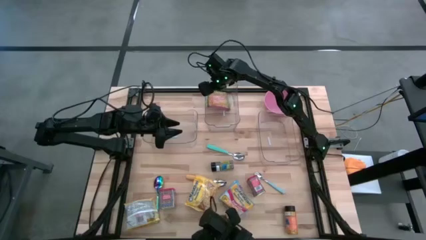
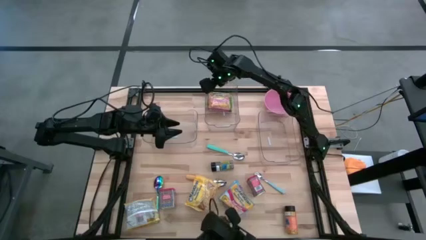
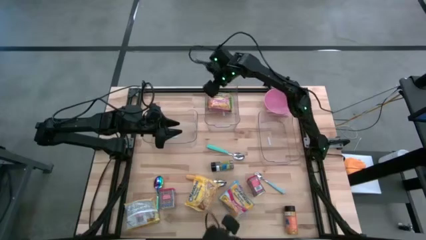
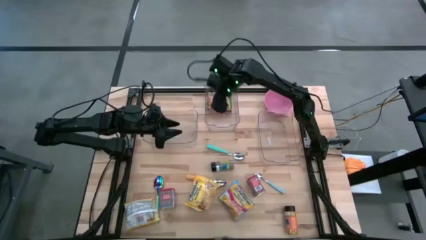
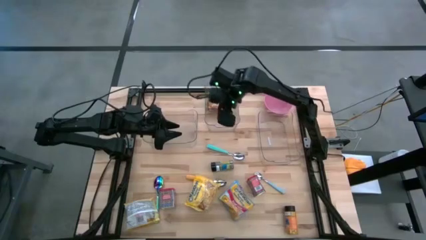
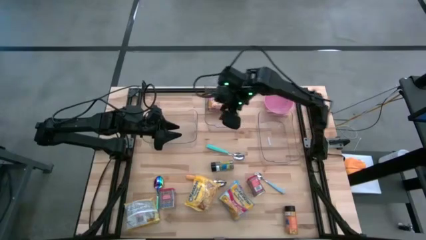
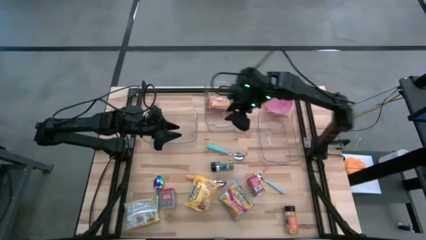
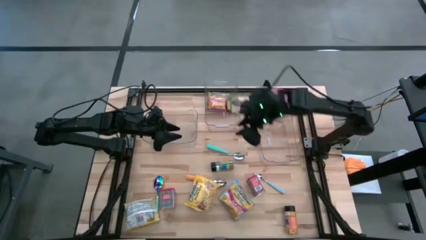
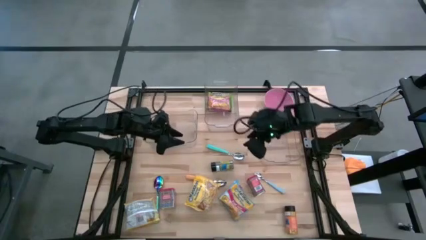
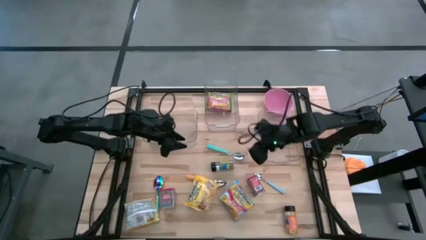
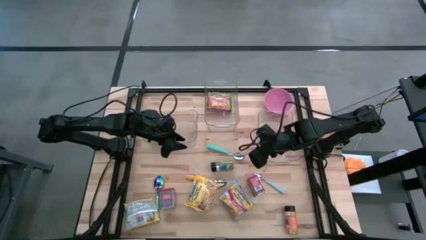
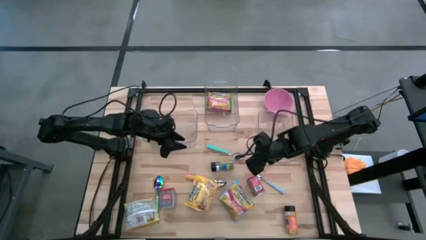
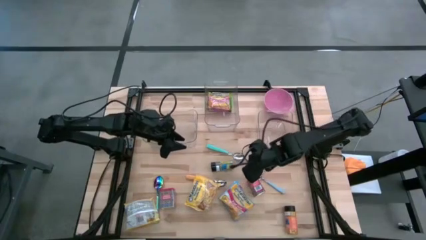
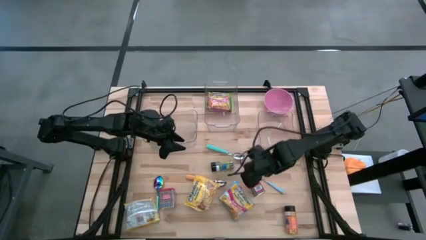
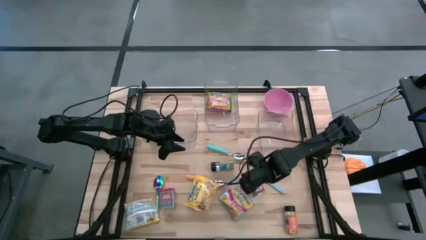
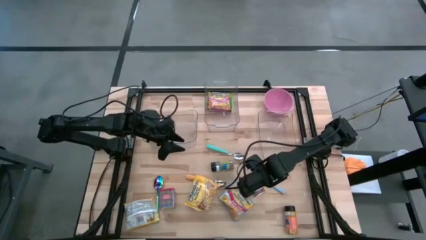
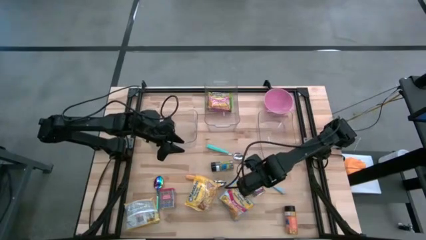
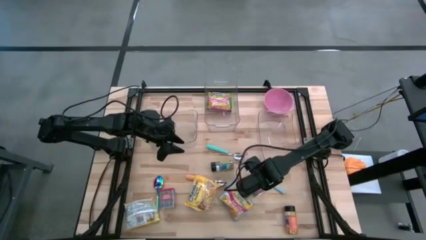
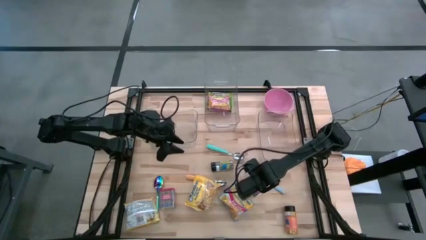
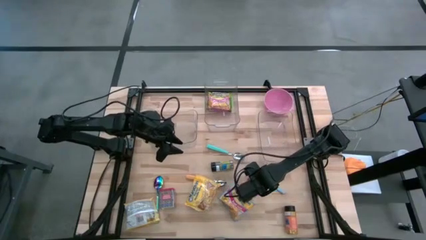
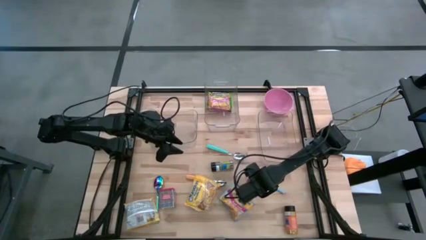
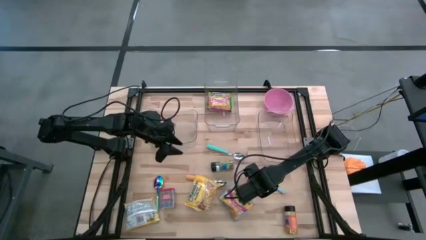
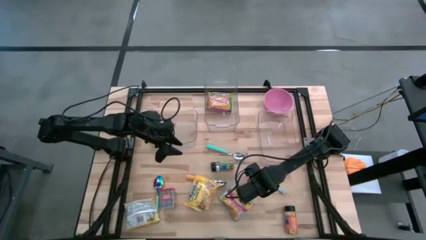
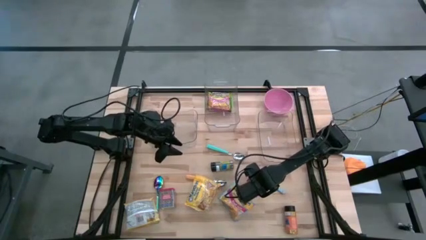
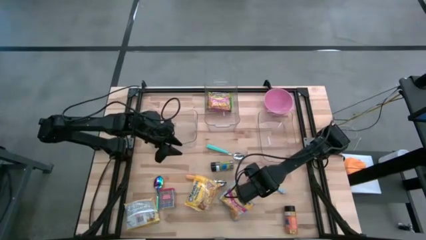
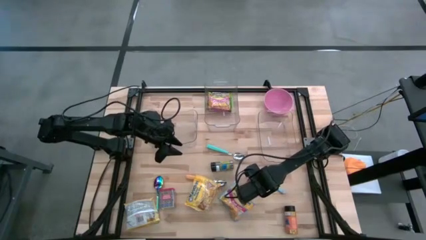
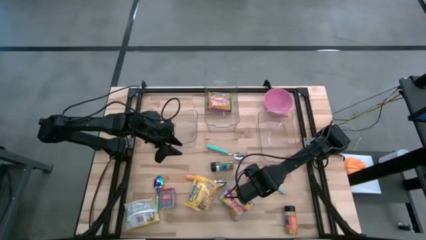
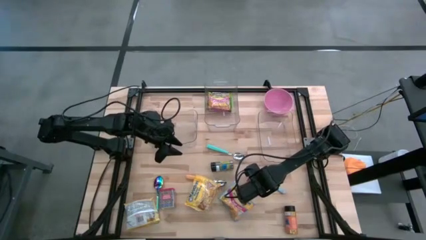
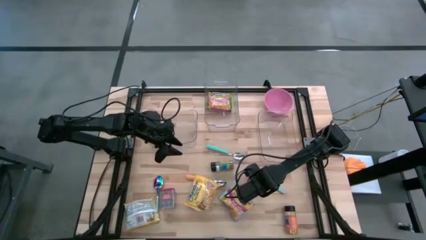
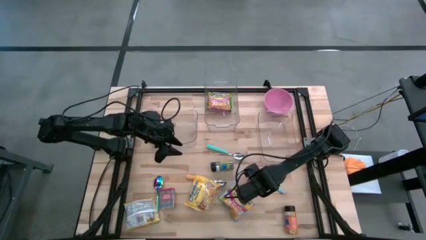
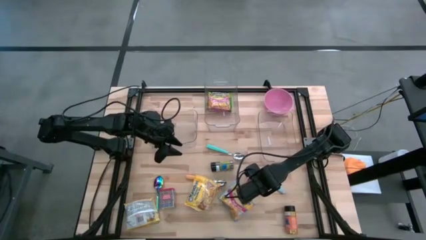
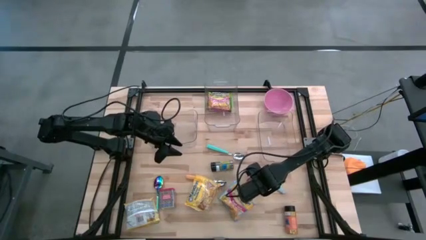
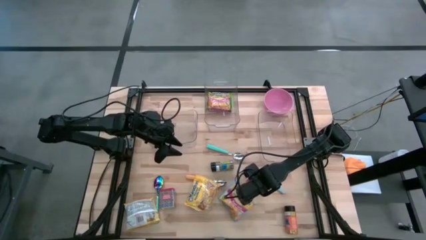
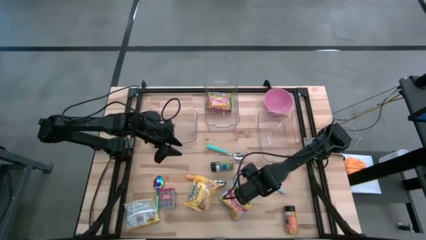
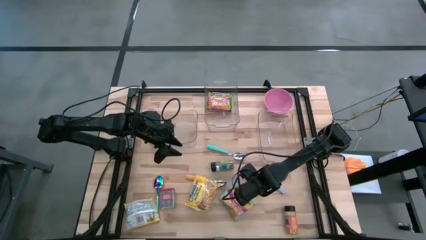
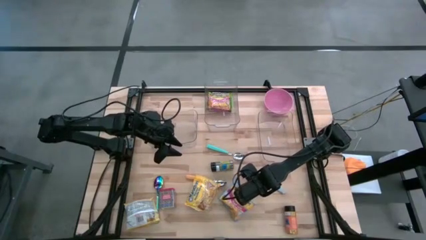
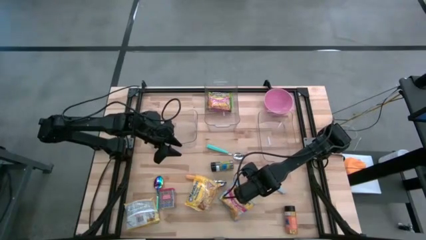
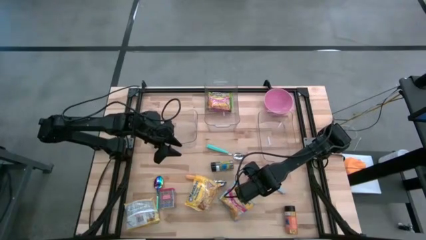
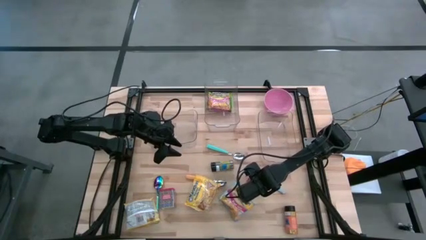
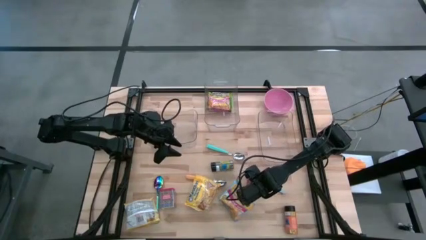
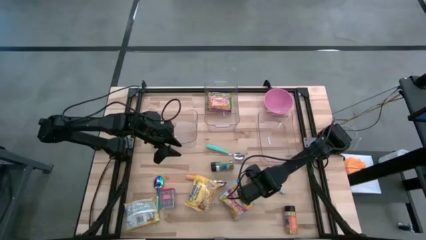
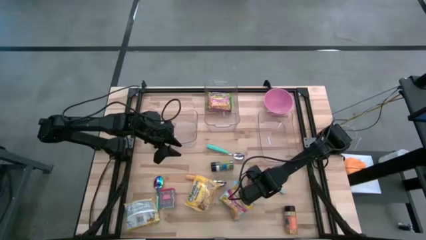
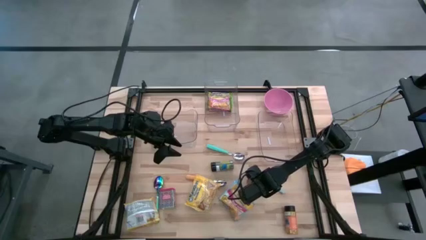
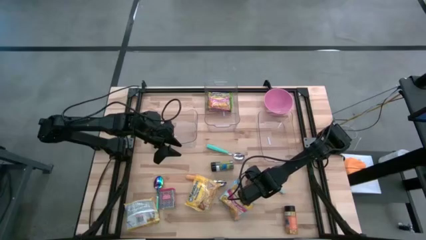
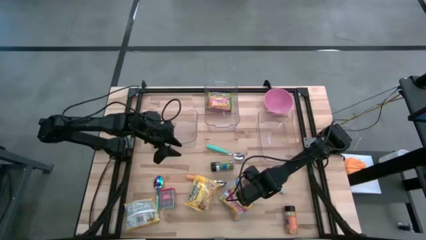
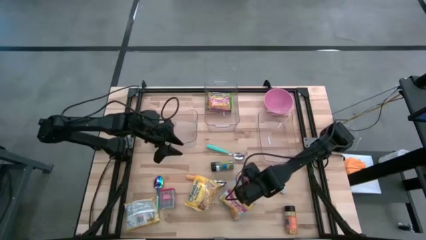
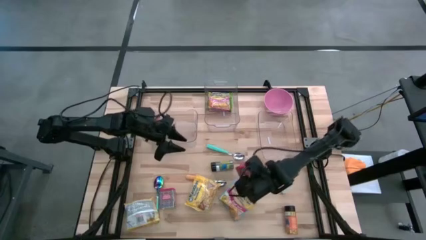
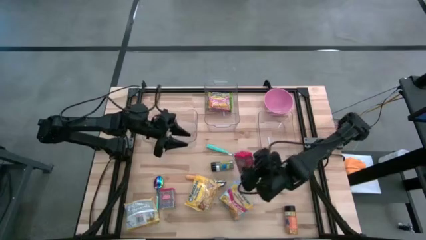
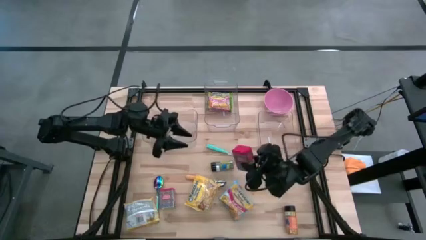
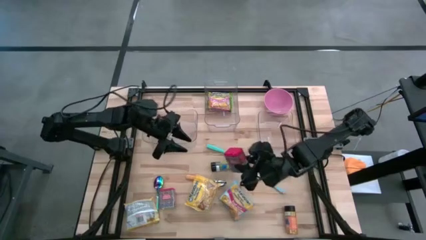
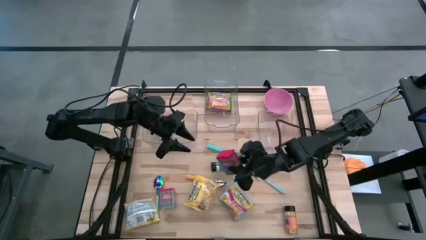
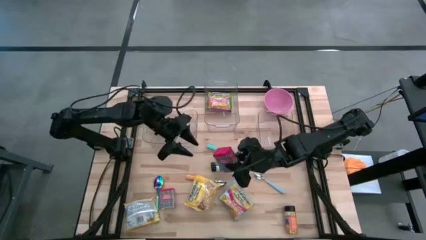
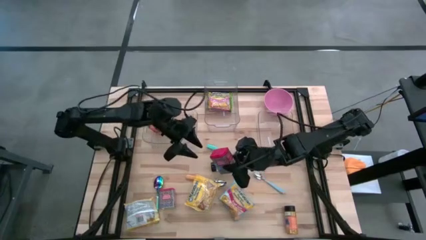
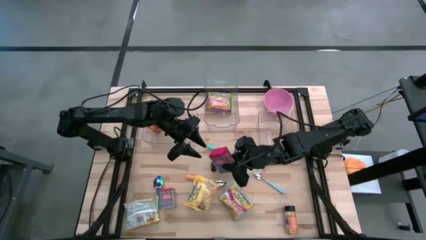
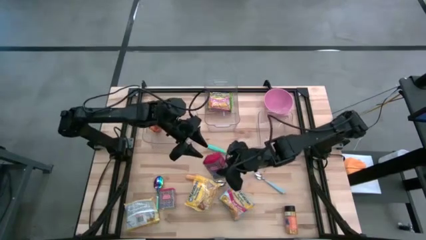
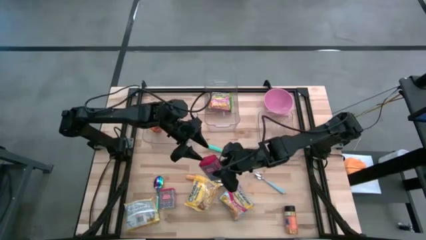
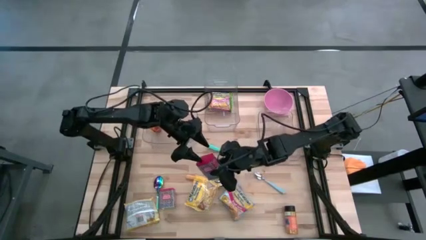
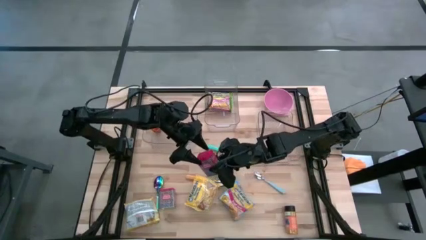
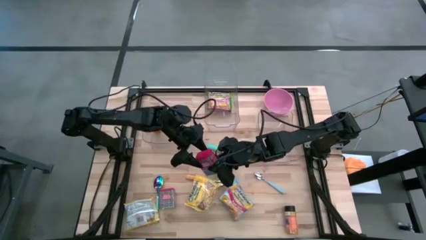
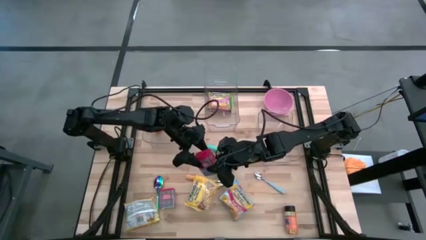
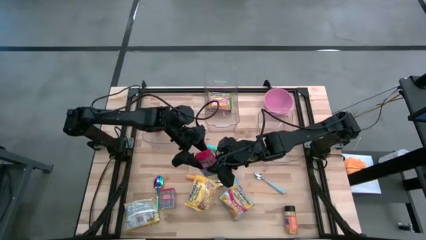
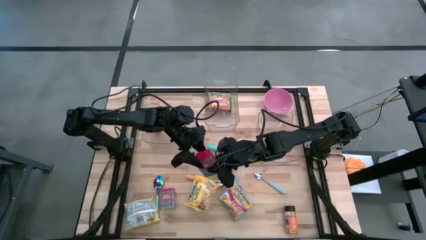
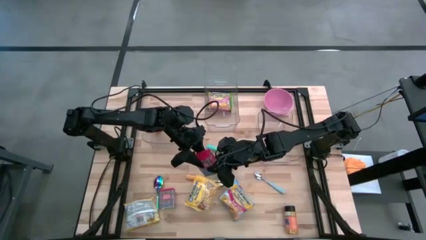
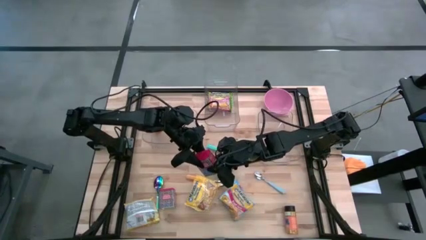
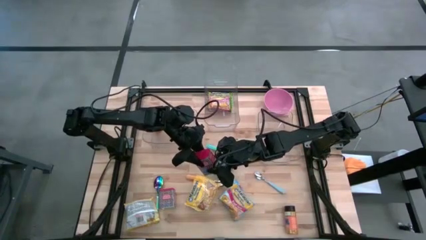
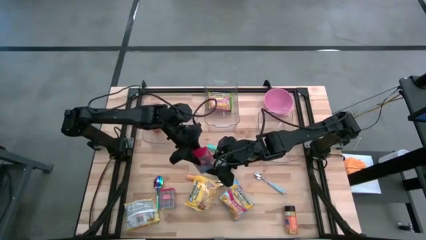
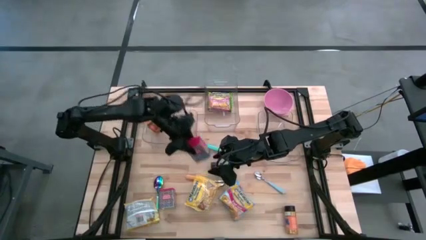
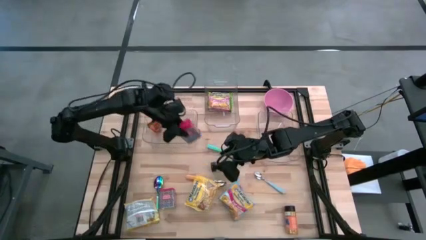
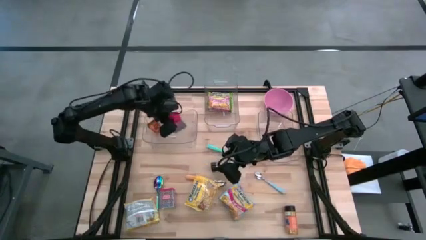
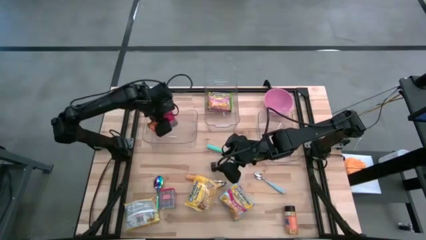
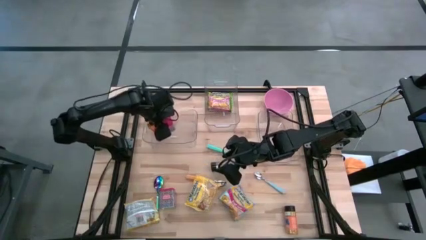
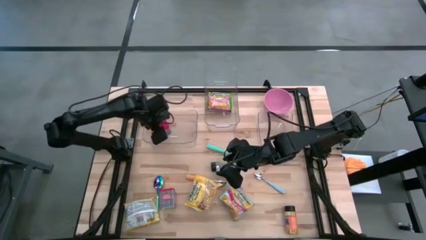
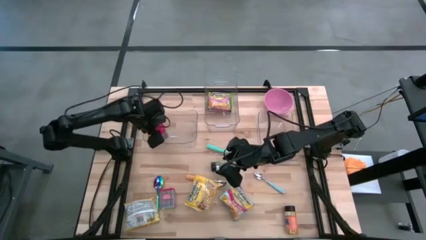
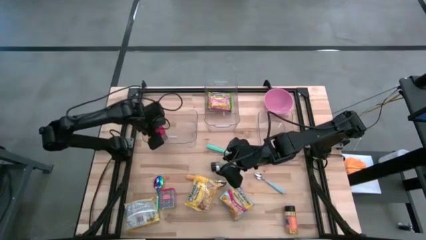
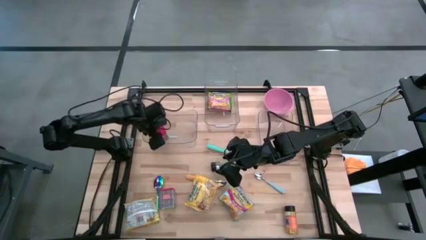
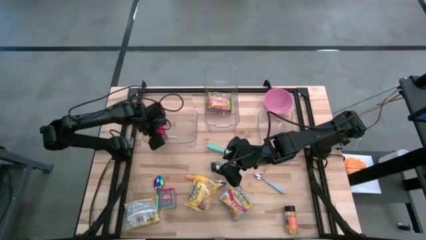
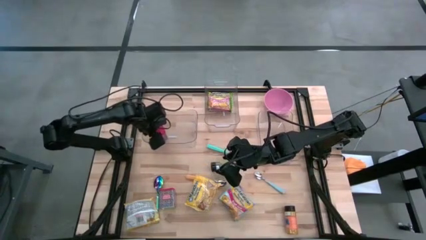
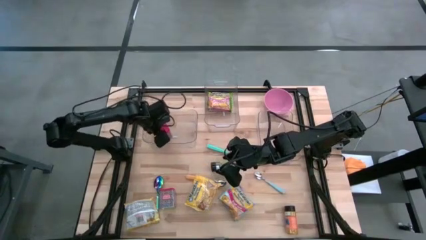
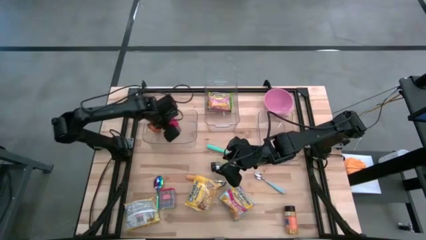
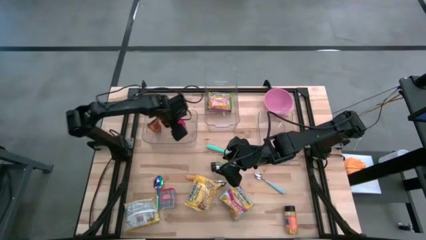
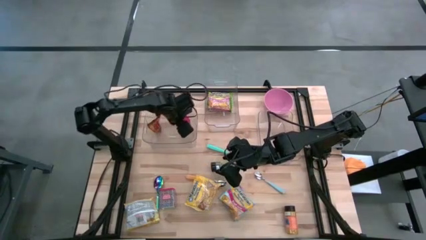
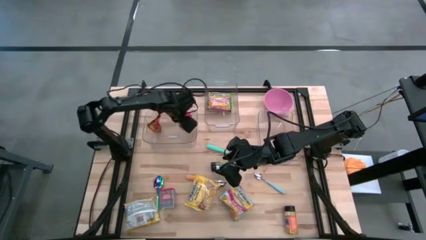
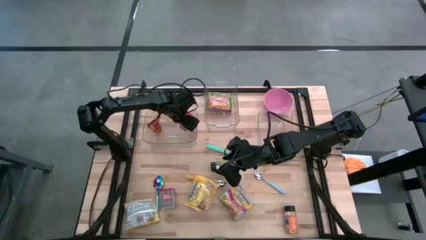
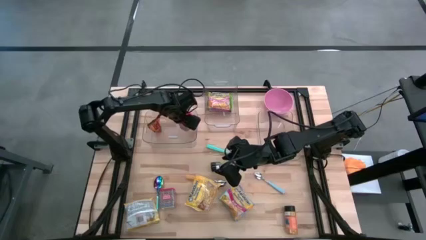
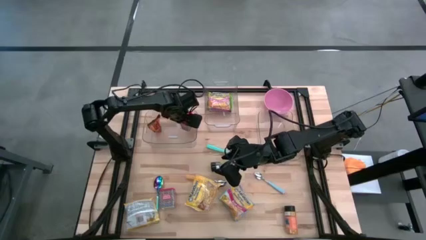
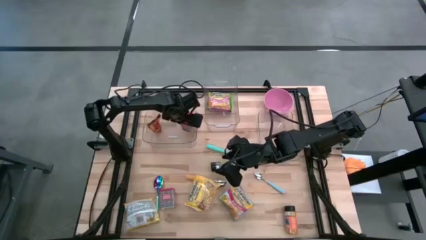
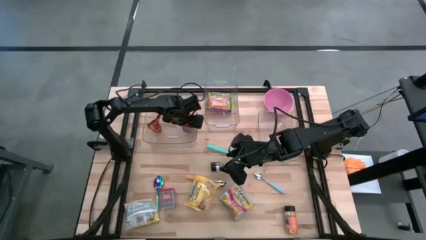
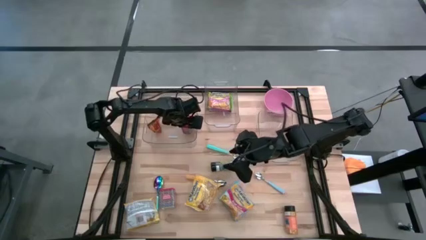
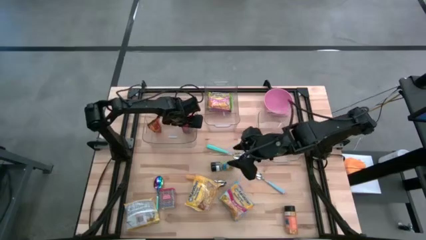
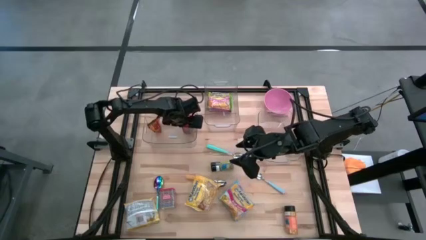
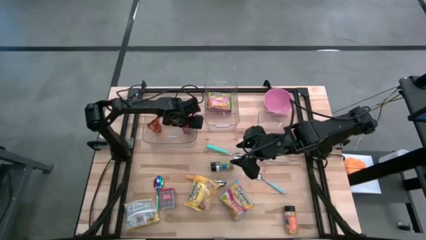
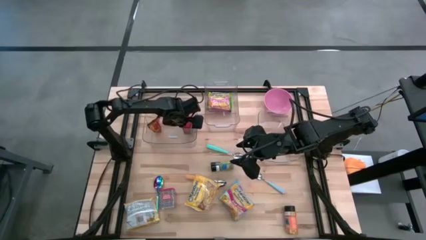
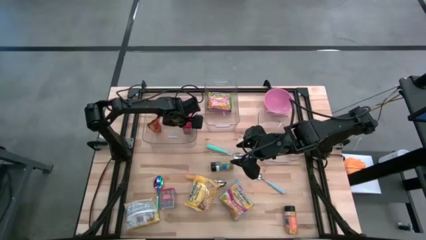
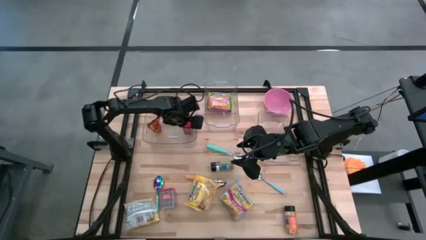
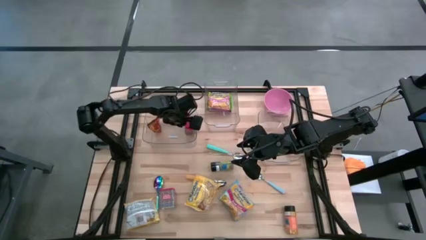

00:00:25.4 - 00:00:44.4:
Put the right red seasoning can into the left transparent bin
